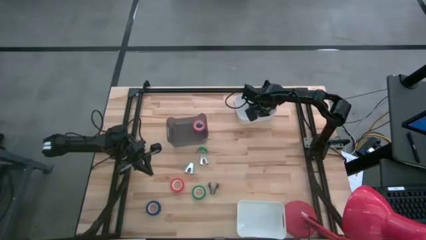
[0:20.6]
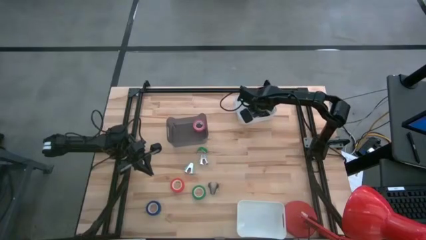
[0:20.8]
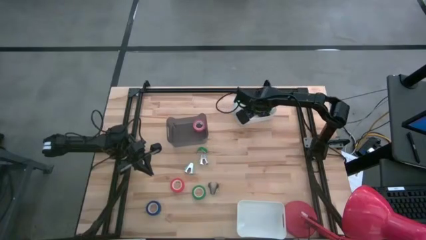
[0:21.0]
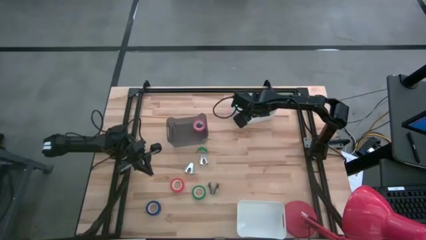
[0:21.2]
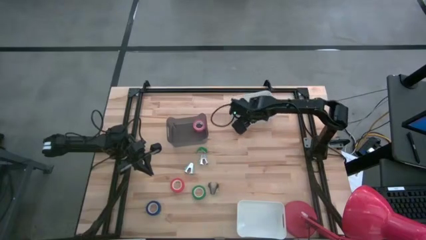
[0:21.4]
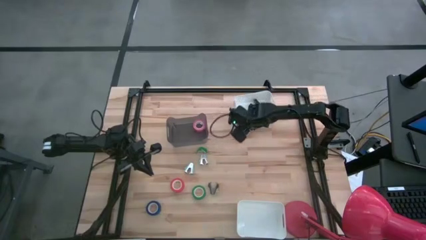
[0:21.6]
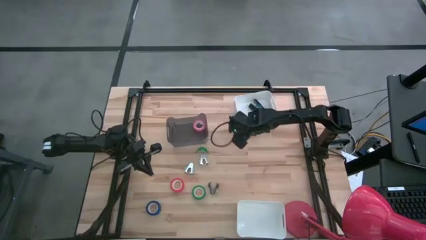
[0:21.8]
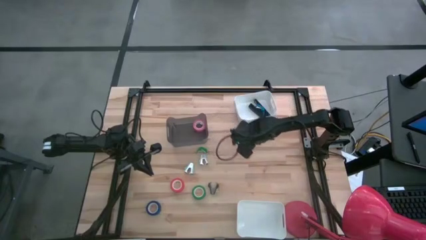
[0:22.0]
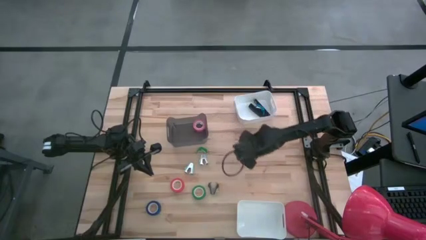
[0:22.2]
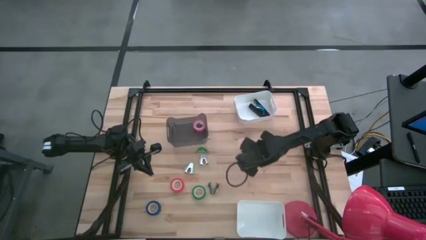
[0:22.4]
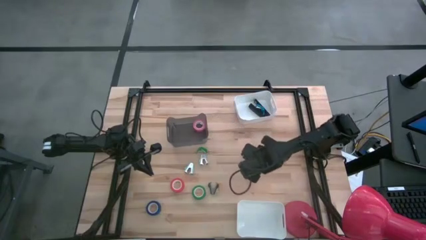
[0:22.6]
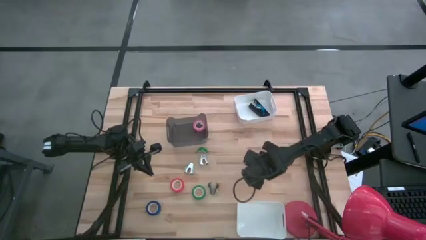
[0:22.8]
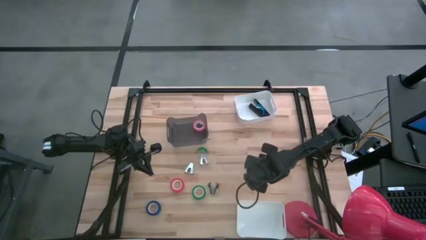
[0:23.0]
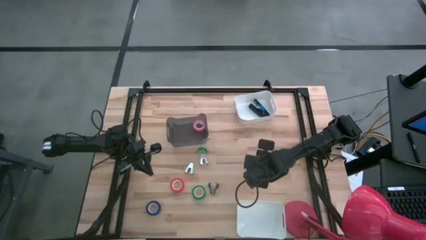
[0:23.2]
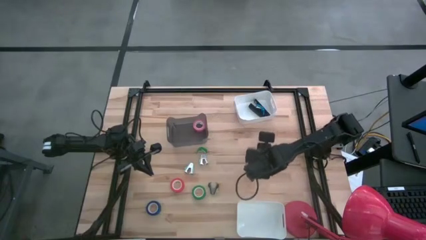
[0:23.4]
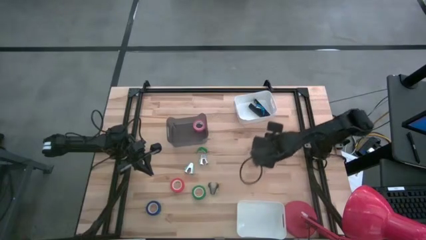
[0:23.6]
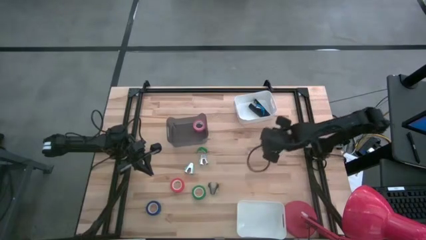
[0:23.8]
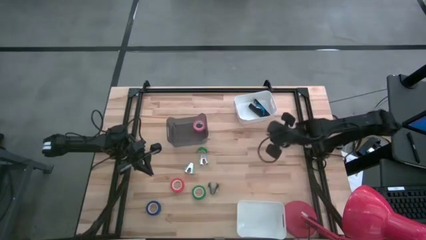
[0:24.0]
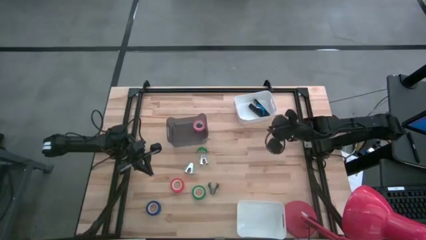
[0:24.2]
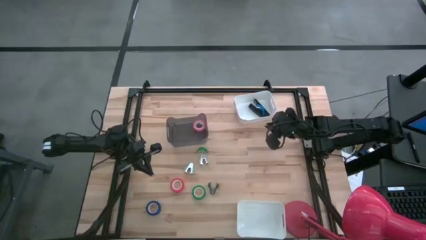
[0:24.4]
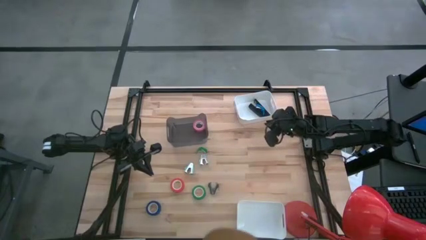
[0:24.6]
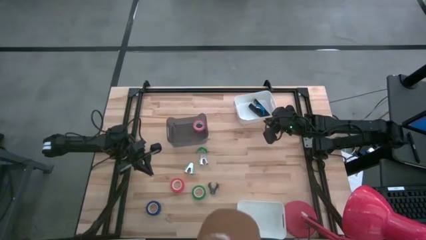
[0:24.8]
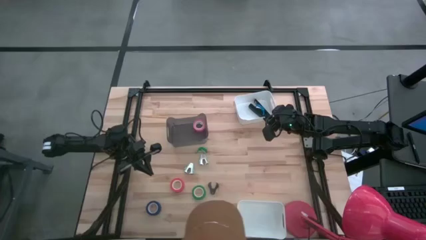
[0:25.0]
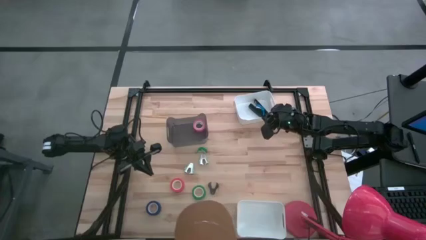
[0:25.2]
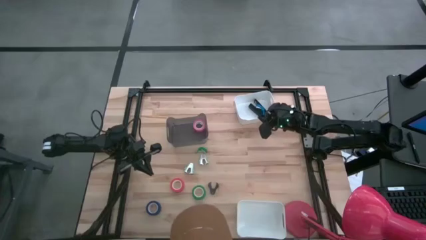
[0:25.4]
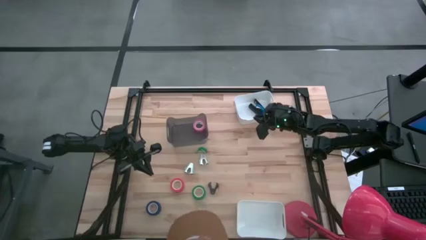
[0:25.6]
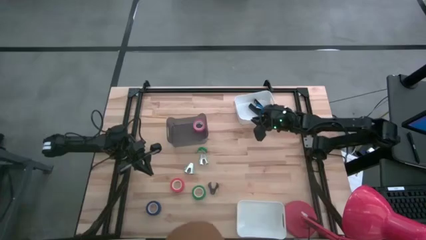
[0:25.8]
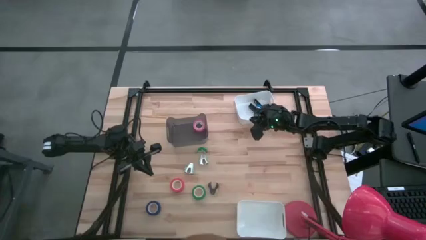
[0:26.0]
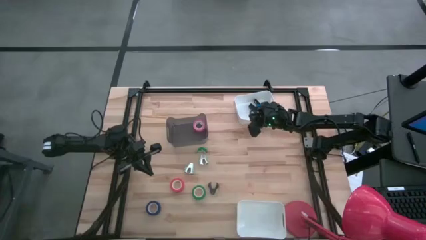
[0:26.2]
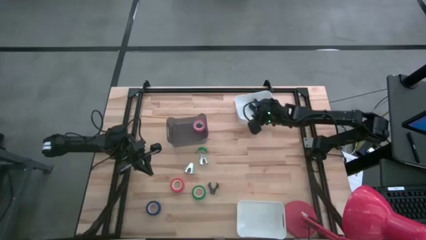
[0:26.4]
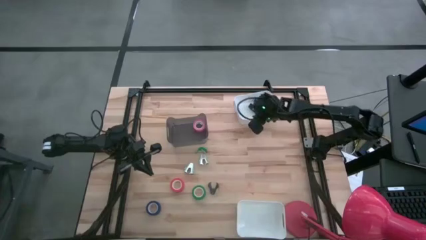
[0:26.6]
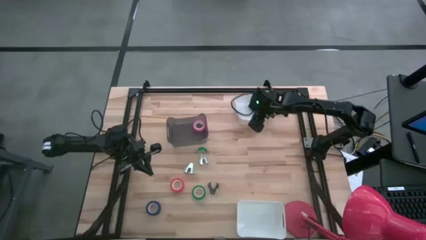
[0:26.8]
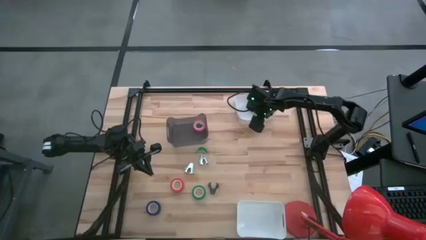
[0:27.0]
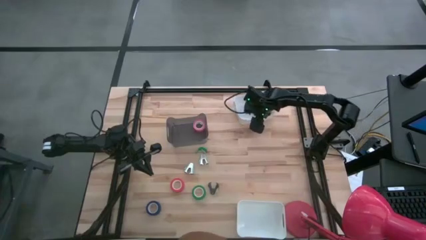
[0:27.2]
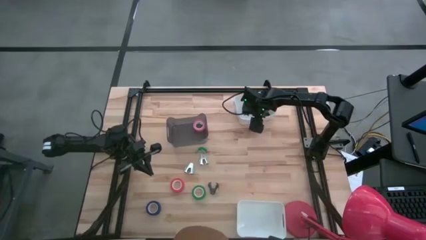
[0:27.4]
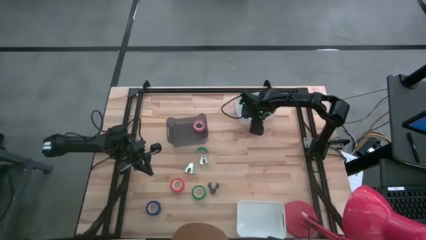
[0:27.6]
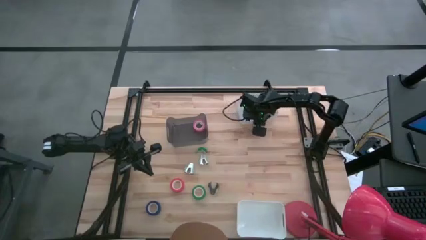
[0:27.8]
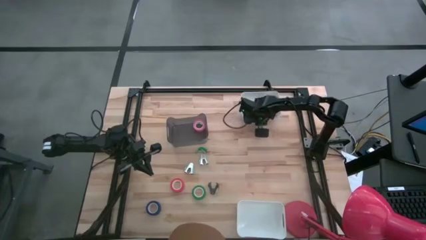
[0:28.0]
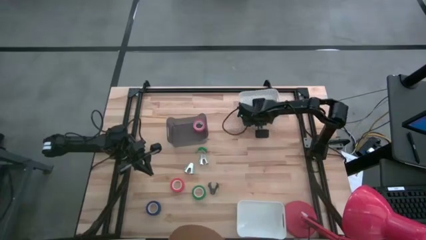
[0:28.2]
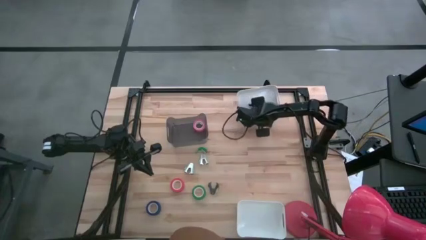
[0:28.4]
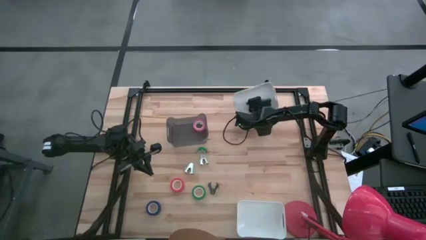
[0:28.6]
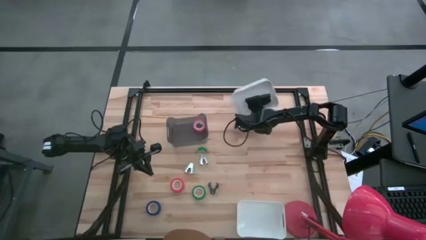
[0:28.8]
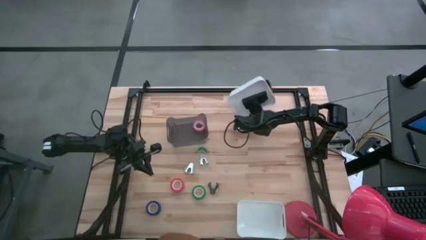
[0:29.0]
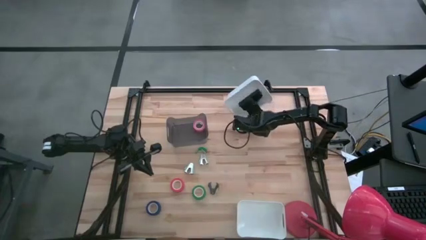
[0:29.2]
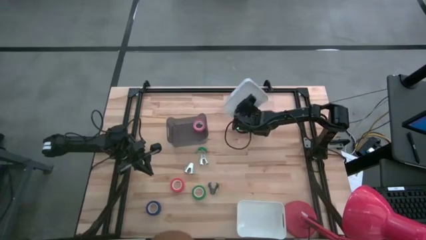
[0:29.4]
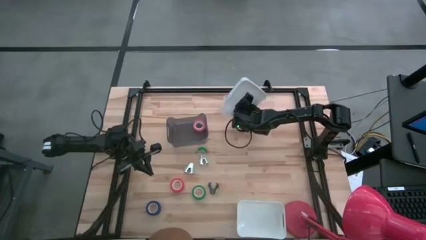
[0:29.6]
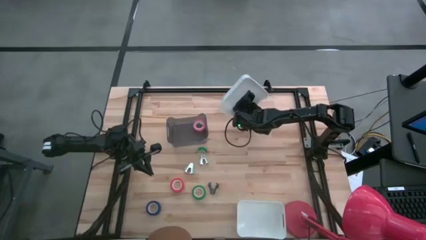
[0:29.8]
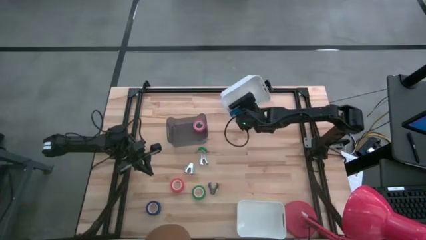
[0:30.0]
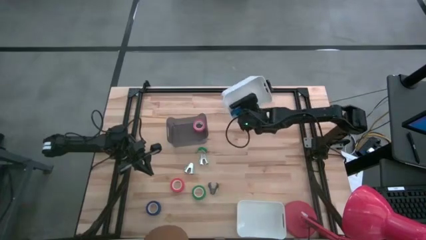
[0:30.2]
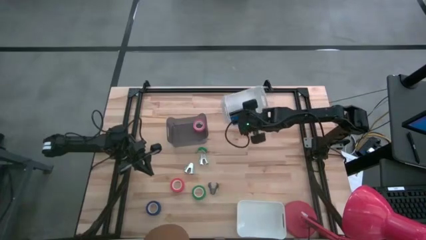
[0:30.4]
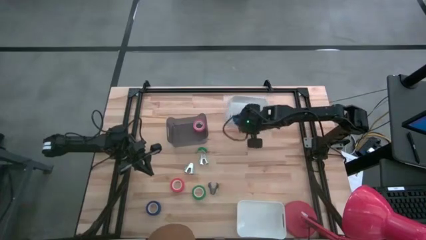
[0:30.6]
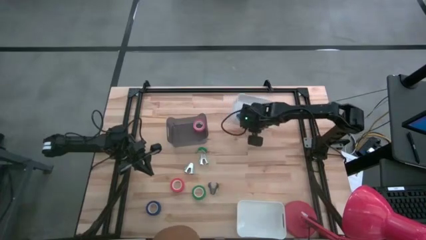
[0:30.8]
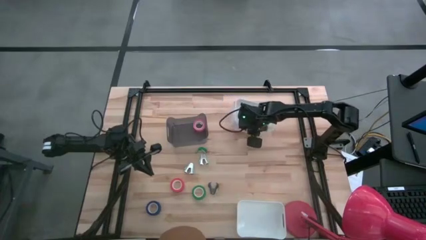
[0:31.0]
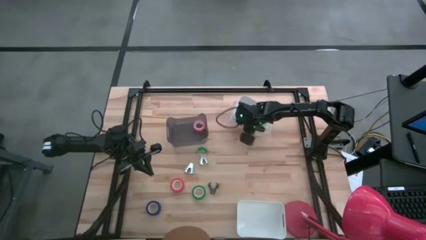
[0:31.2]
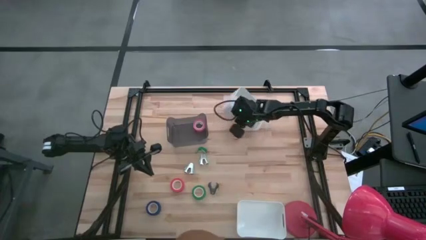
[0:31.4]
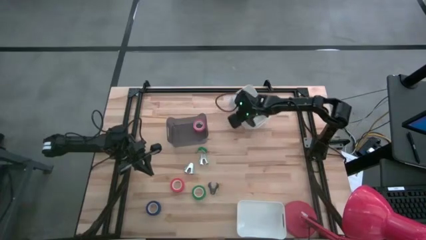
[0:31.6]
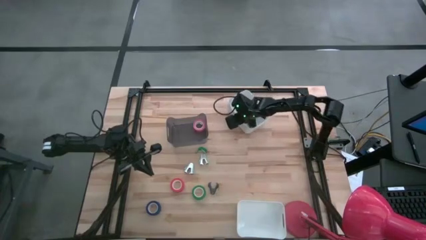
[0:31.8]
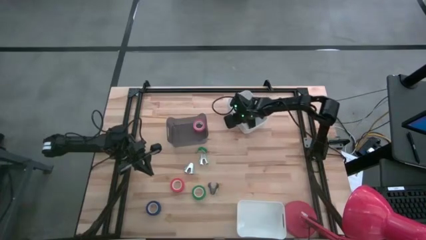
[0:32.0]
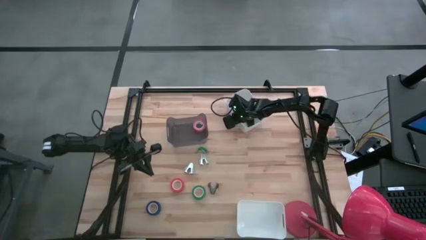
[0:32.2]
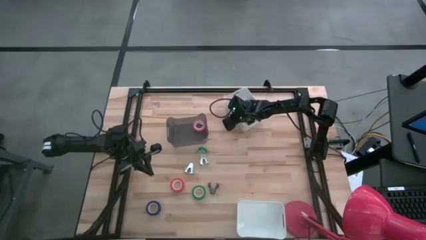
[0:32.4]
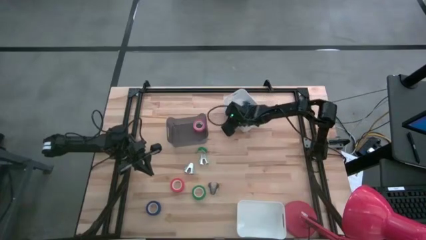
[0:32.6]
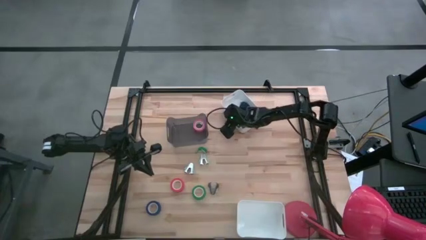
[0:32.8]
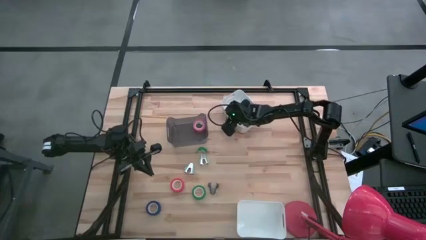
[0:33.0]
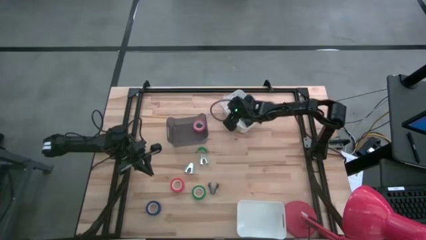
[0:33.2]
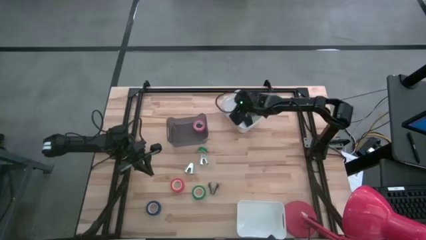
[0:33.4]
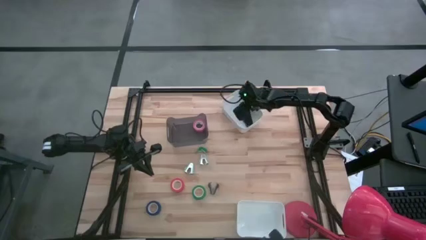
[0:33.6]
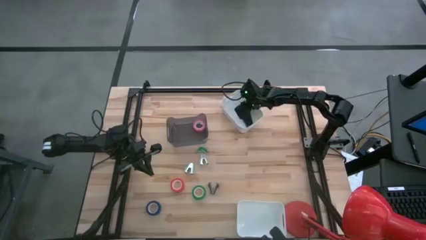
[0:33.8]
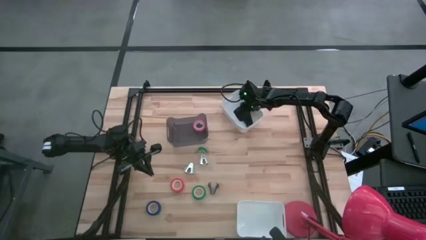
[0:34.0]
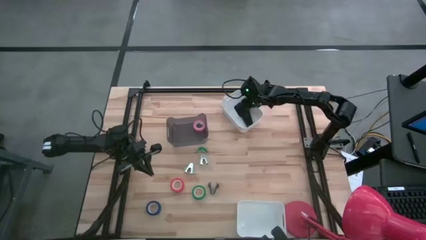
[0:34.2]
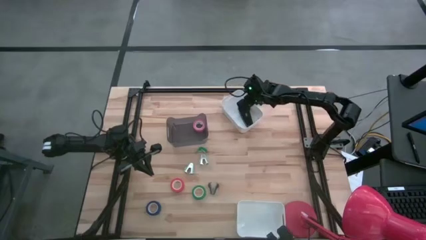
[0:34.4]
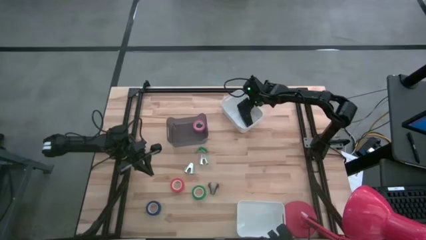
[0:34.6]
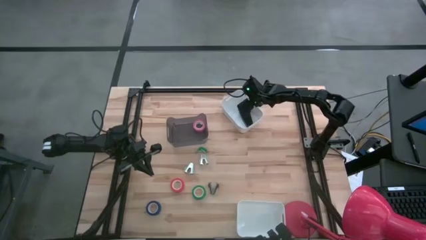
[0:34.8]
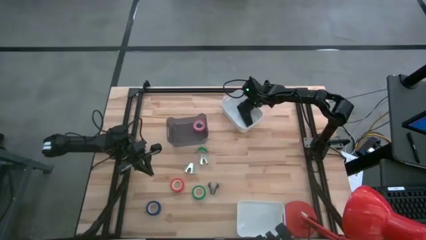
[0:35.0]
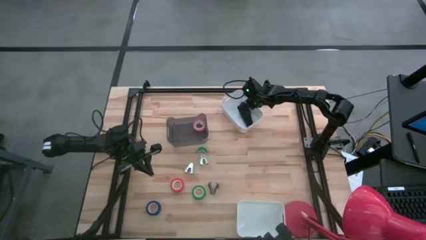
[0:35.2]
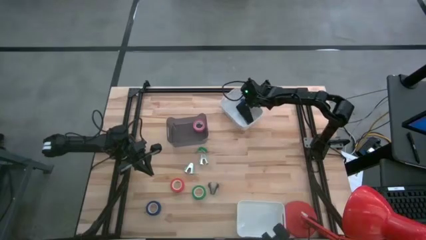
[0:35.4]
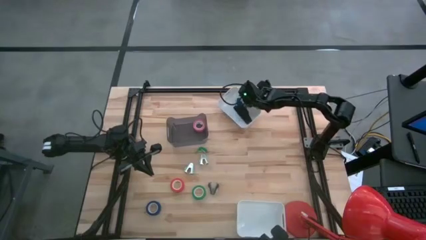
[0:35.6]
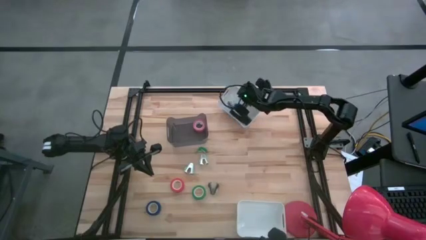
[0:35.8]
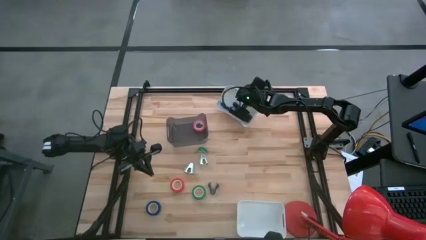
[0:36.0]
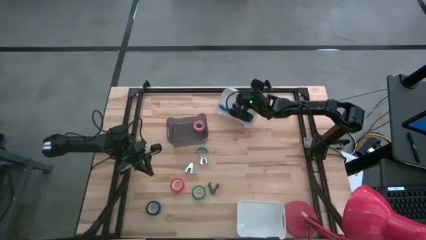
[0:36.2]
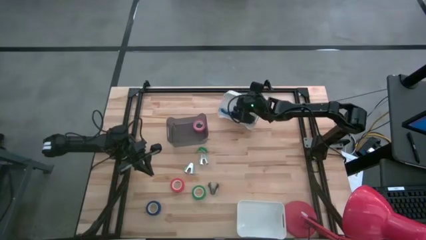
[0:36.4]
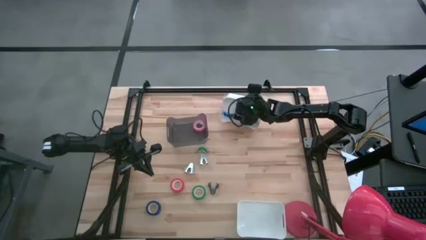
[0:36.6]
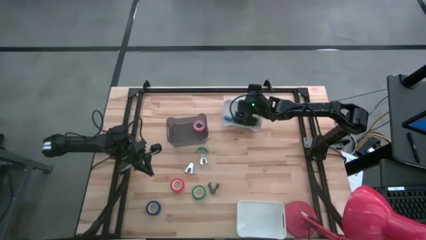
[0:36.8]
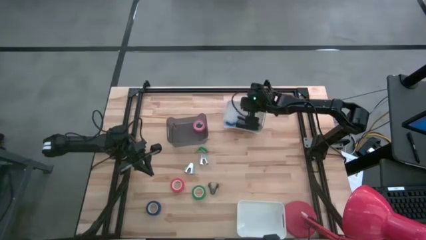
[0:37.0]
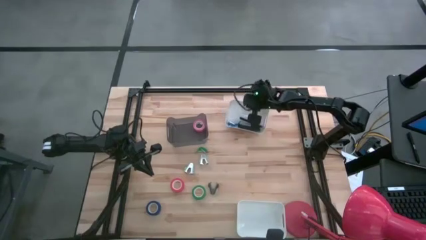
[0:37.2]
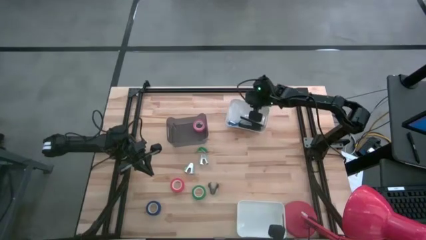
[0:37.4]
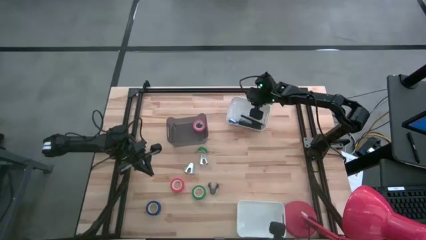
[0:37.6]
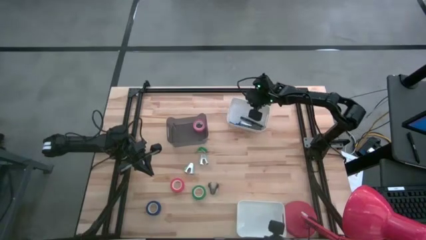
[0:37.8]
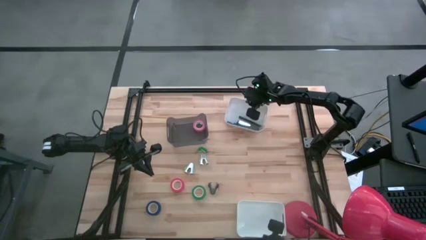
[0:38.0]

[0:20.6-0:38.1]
Task: Pick and place Stapler, Stapler remover, tape
Adjust the top white bin on the table
